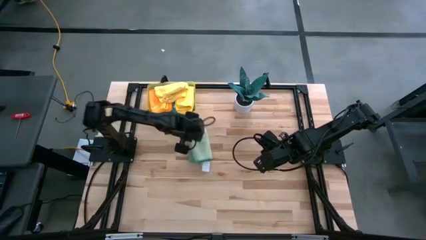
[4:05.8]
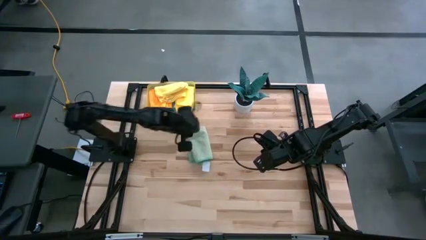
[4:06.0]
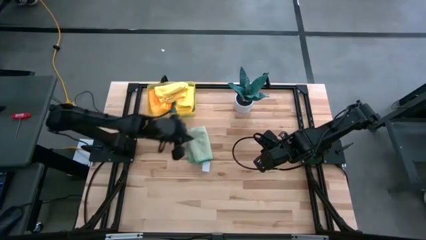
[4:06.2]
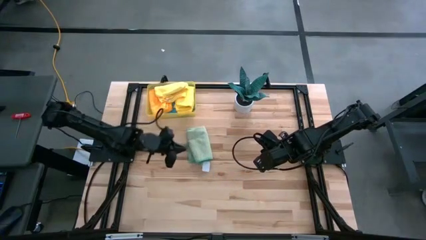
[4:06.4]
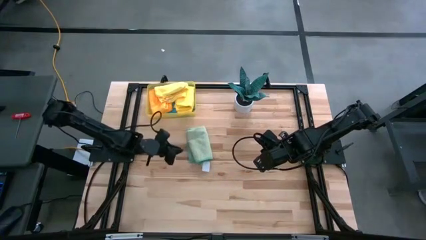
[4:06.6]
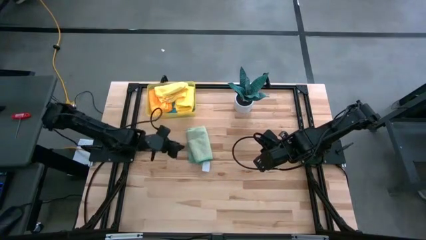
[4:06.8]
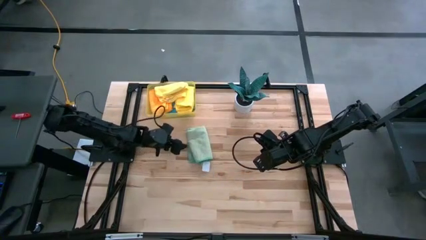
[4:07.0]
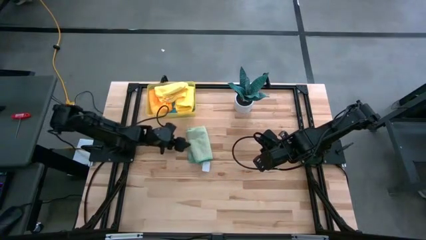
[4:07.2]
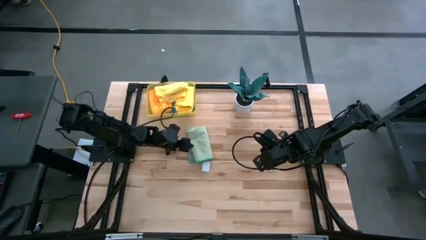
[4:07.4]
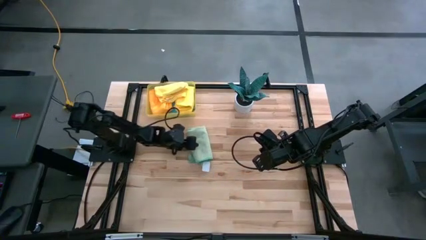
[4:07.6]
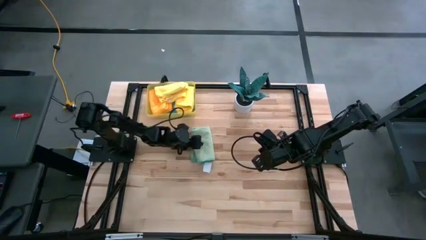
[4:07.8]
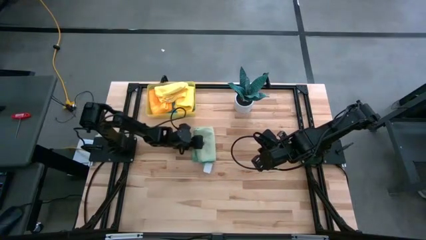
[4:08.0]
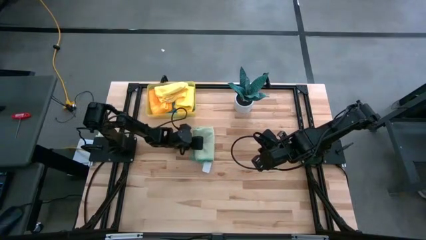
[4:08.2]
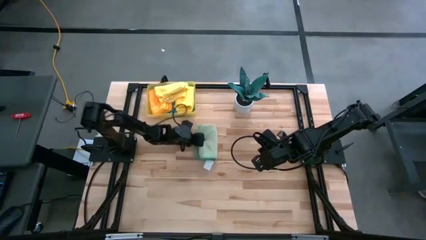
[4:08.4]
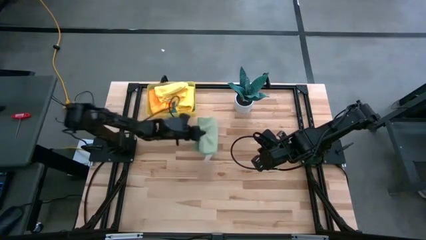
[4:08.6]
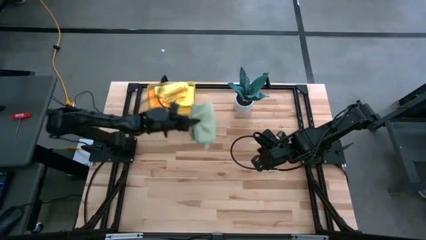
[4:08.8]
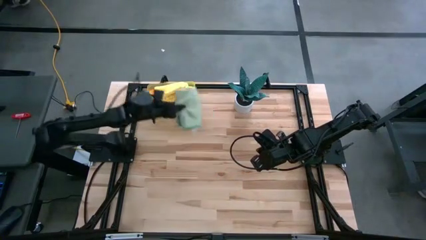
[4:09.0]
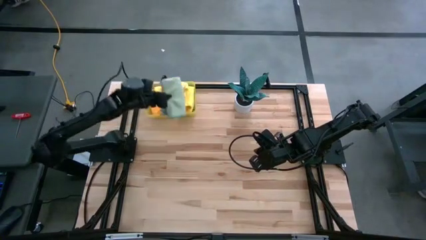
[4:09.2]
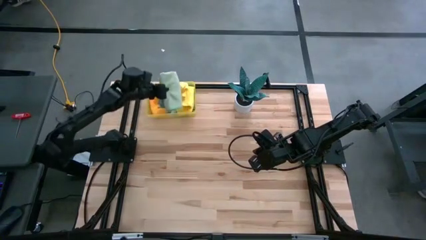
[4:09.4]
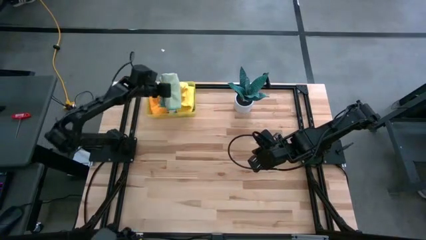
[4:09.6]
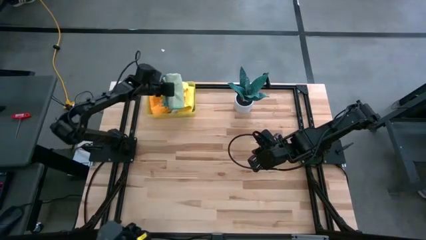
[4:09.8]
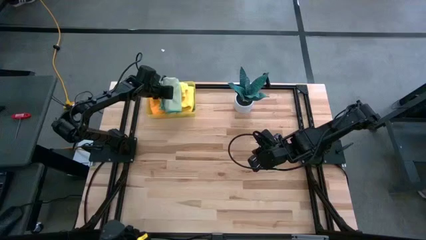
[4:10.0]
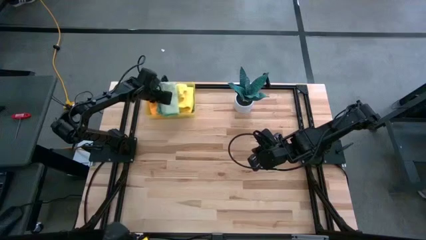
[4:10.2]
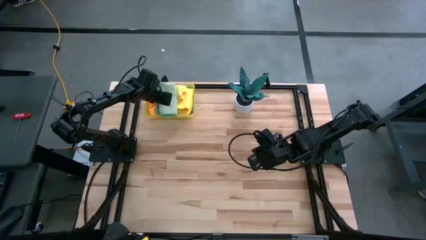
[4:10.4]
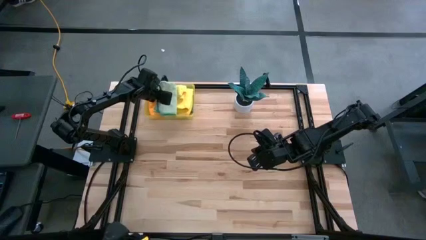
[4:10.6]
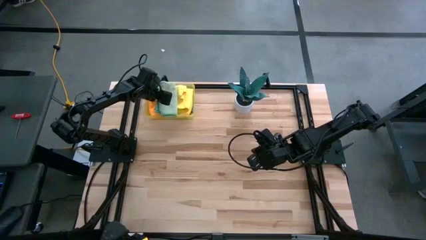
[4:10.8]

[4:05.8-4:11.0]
Task: Fold microfiber towels
Put the folded green microfiber cloth into the bin

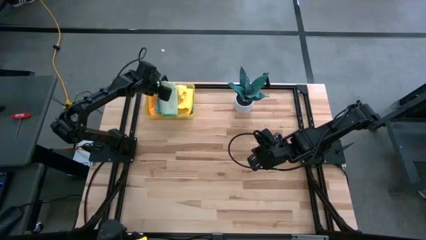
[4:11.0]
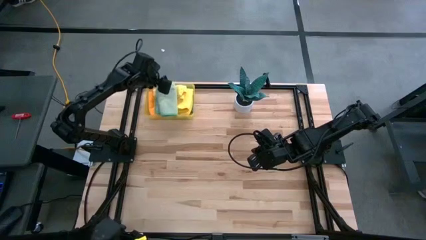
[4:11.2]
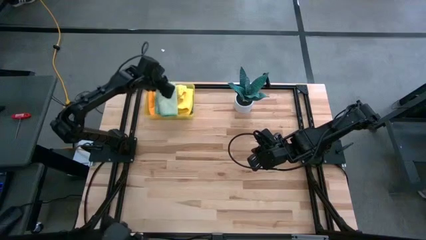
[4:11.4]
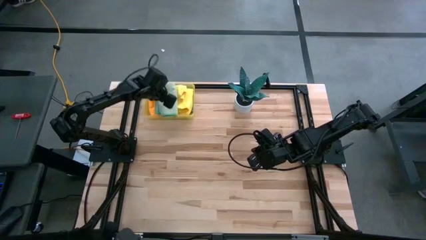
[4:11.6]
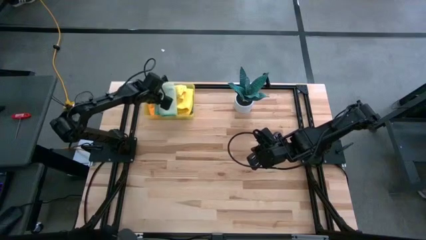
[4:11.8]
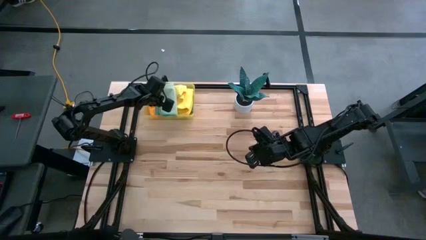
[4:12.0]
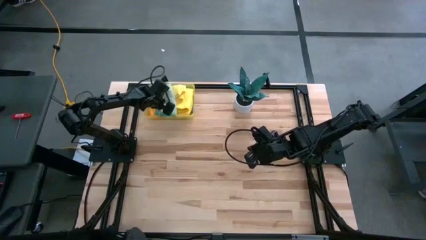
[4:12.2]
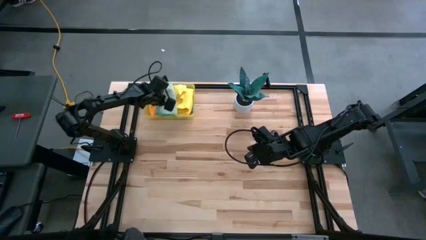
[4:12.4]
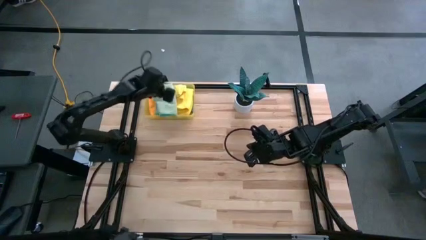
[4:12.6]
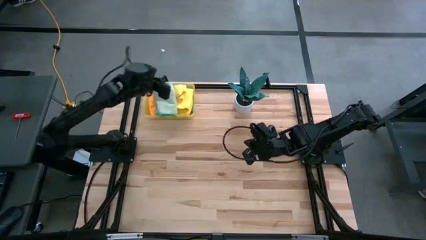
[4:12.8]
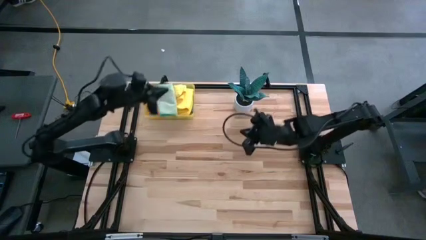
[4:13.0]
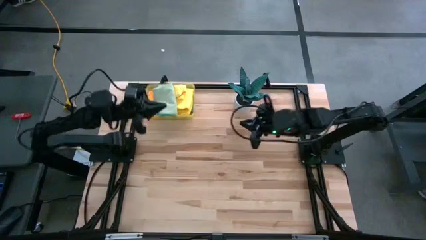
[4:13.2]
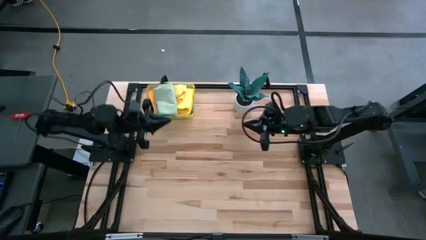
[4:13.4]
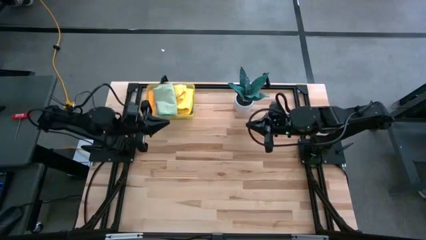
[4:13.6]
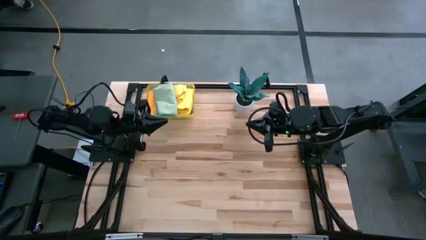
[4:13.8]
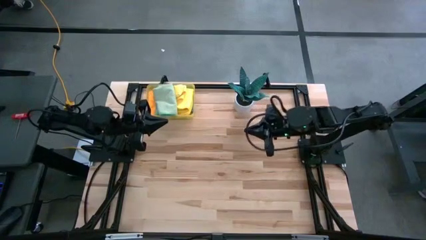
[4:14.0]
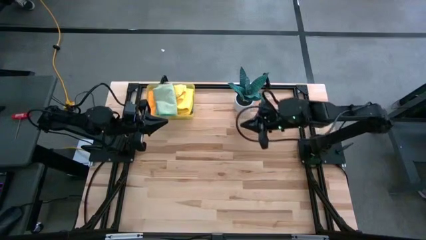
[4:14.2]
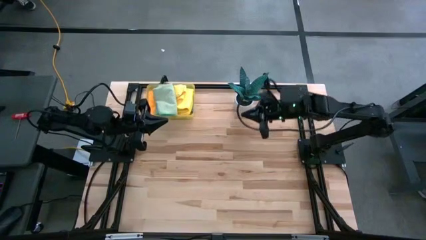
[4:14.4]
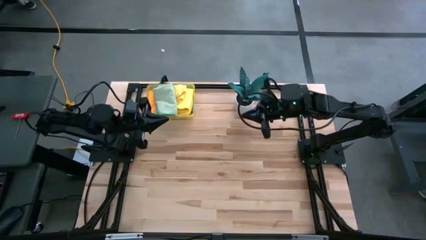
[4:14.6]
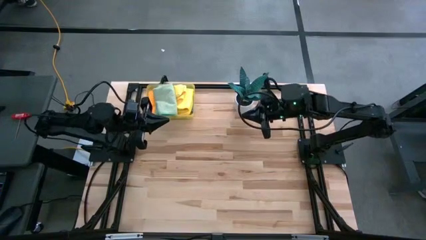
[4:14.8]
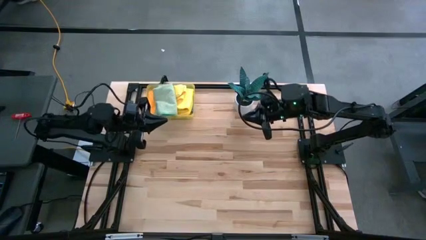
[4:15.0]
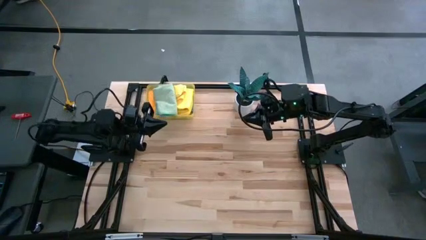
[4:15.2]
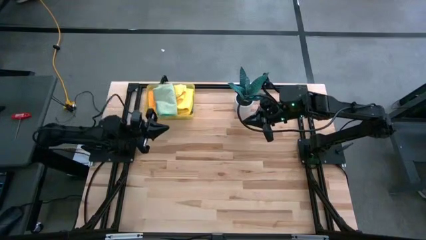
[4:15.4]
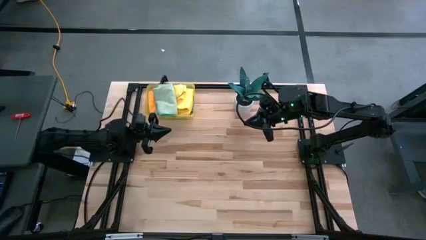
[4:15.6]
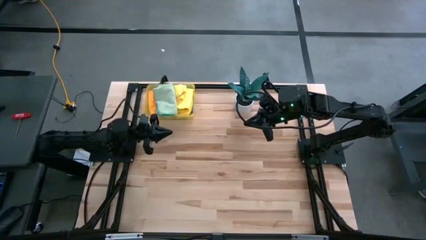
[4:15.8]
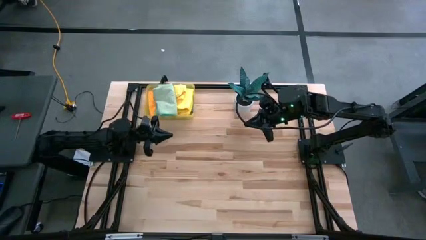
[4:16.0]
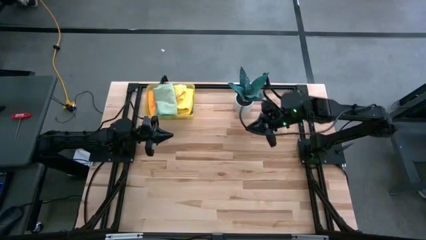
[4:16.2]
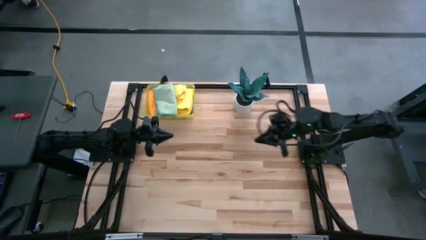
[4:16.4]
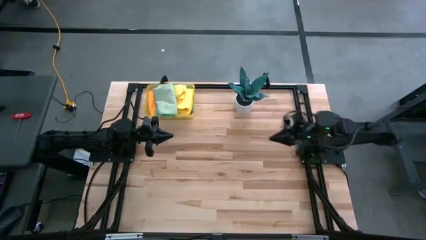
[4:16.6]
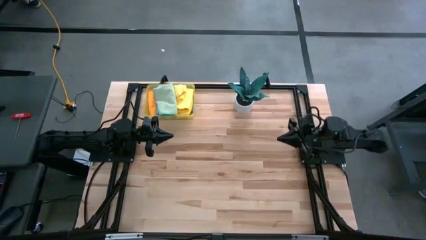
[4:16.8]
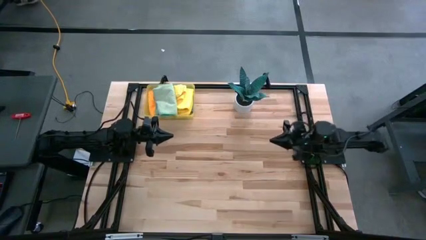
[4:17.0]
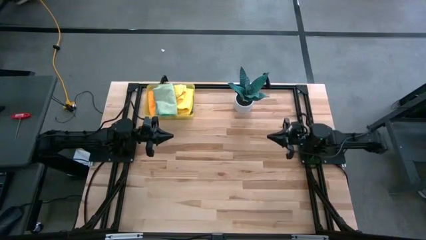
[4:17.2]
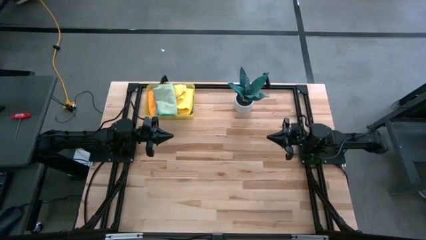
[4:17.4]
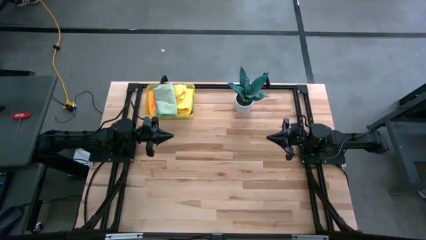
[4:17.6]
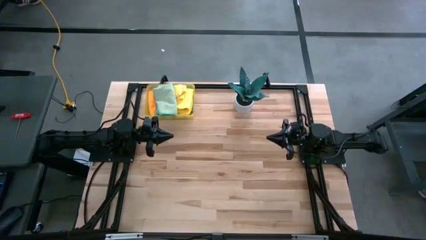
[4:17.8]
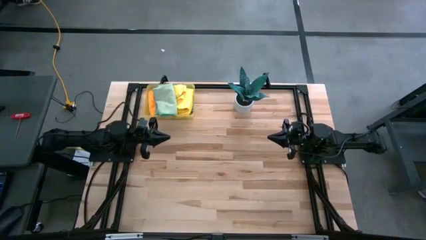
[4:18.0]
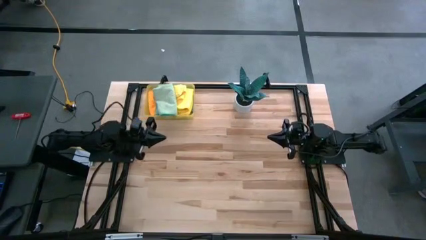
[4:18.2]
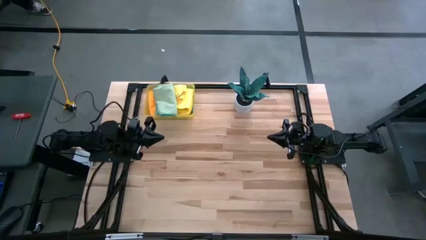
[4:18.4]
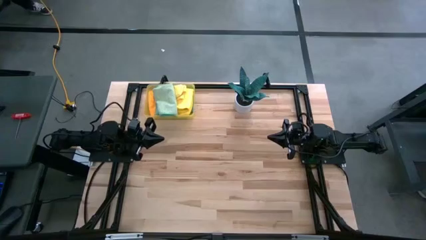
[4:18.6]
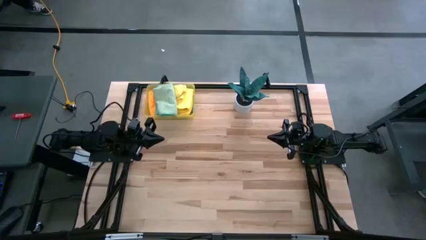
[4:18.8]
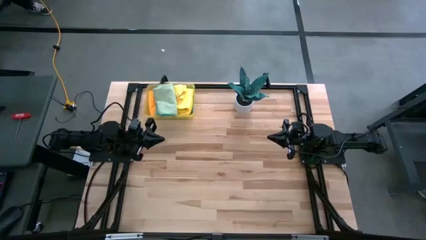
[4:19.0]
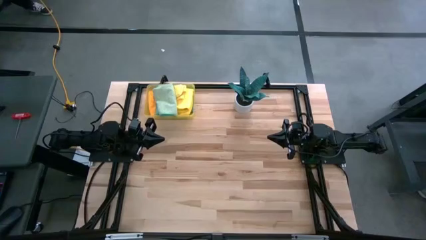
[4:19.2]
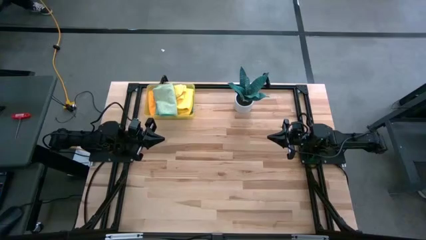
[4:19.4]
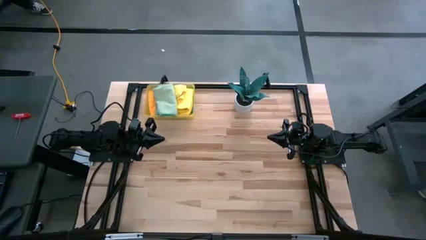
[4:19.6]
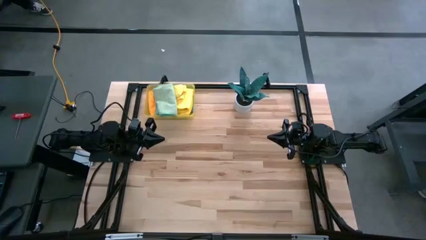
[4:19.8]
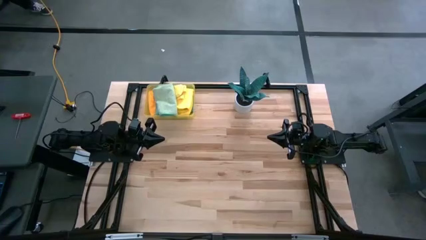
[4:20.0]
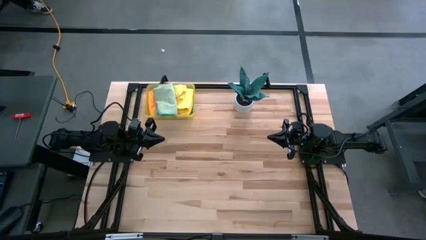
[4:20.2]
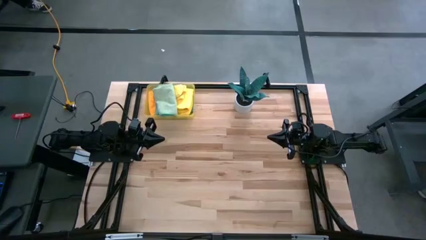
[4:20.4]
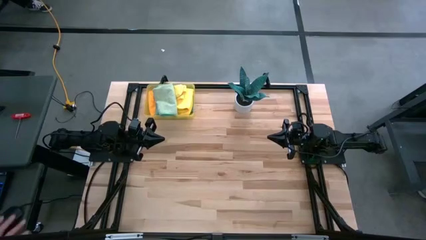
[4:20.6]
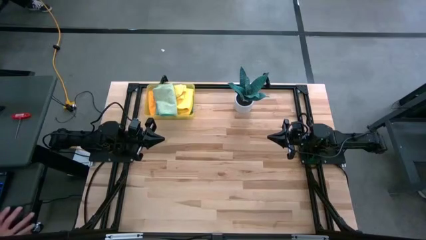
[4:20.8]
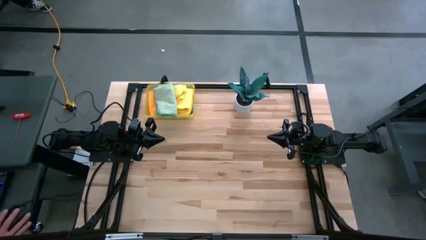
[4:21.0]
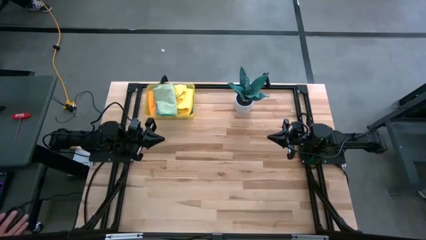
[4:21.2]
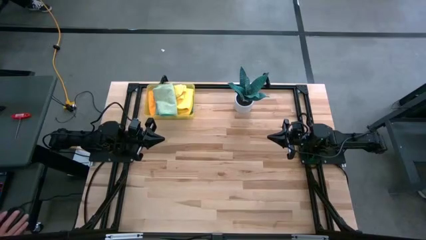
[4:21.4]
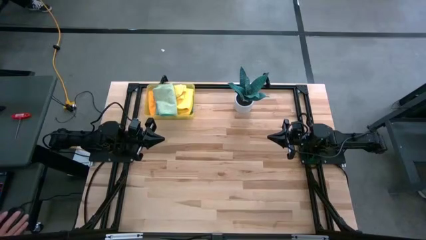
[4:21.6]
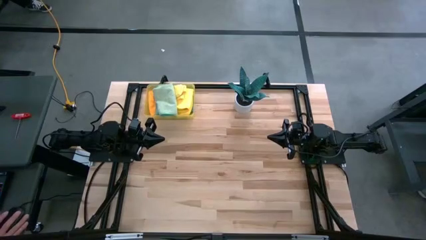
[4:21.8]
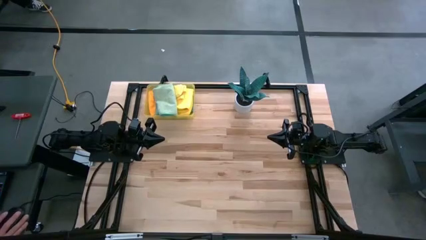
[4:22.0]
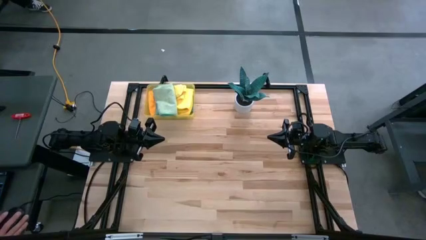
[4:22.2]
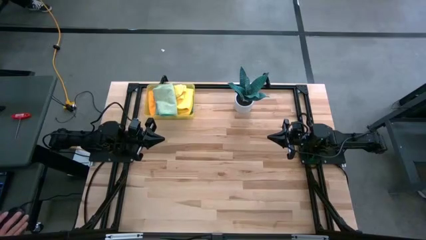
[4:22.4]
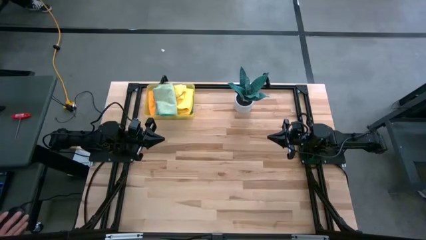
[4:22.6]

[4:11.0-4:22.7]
Return to home position
